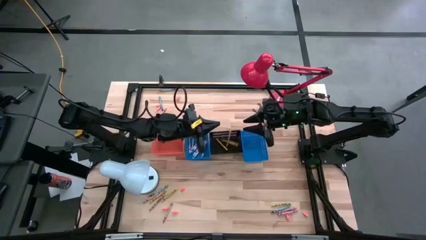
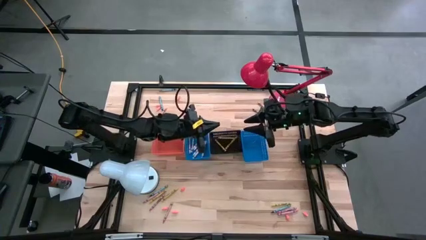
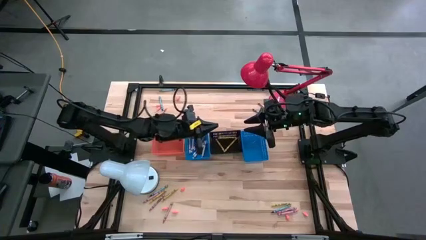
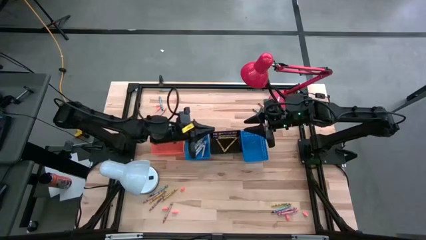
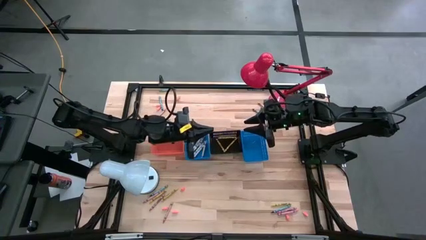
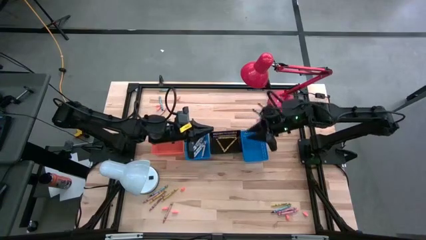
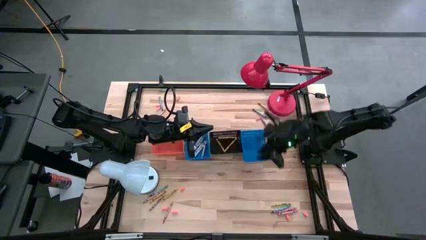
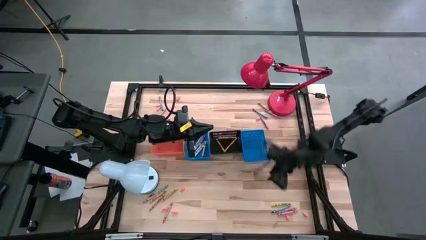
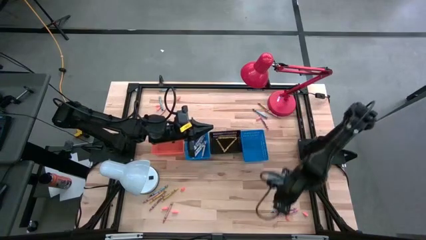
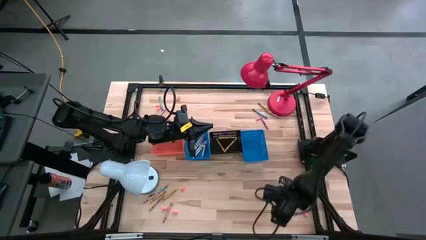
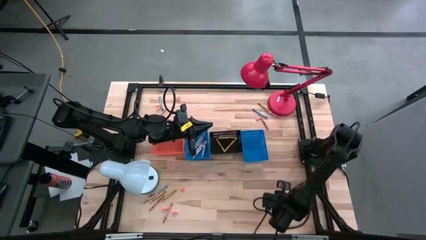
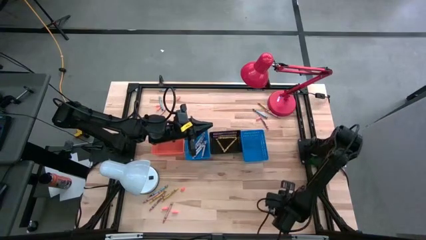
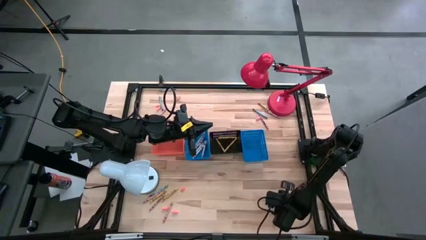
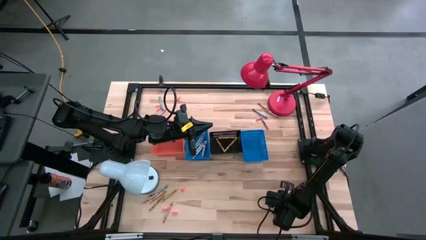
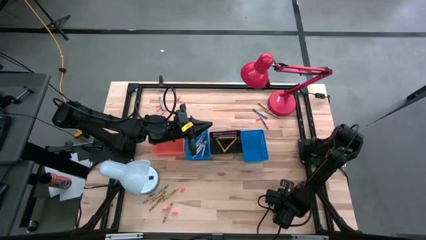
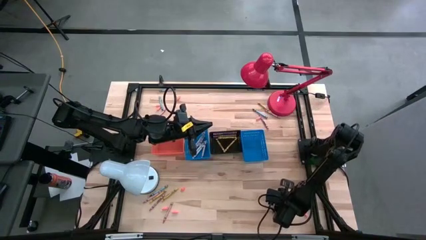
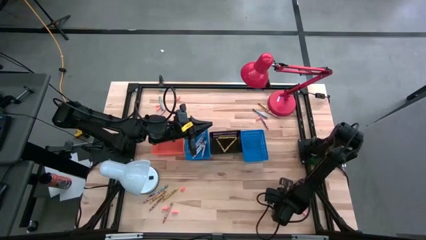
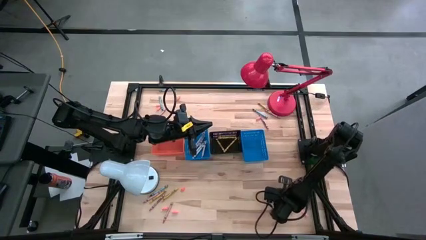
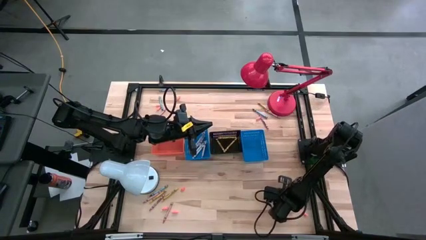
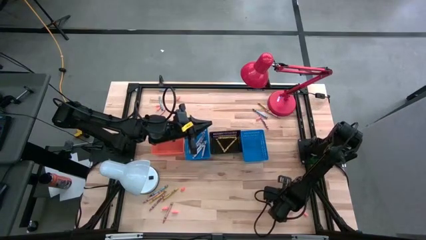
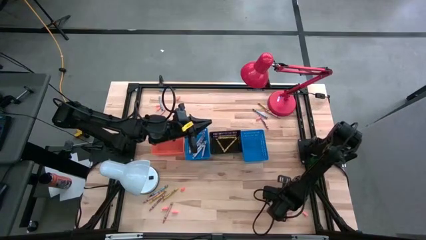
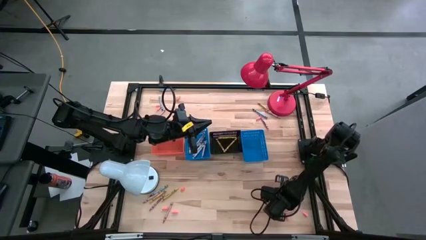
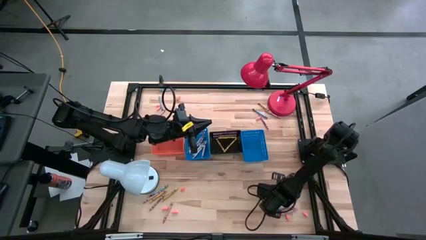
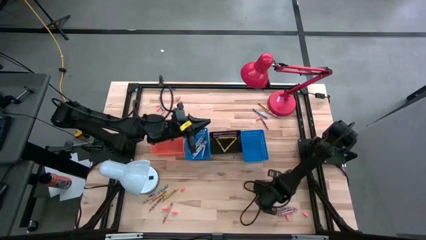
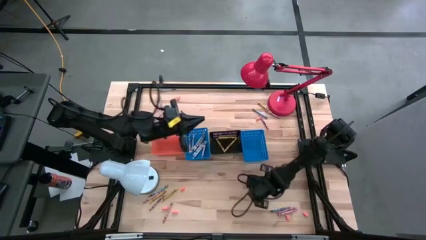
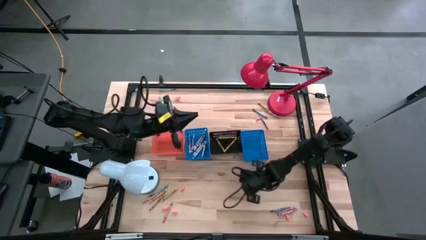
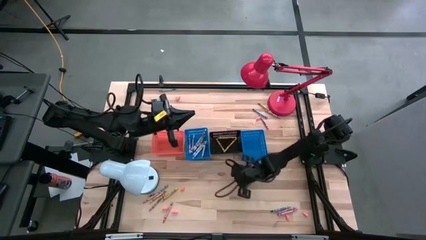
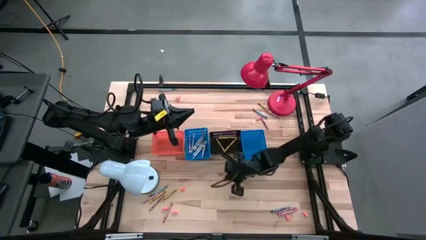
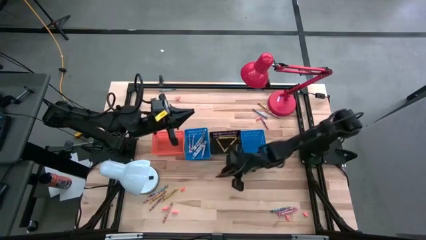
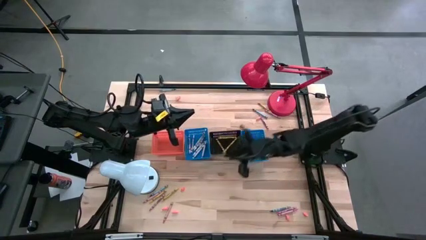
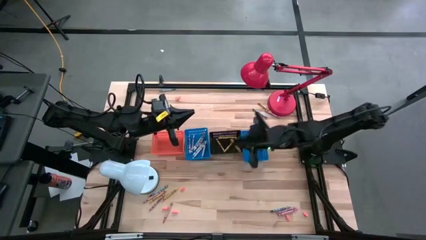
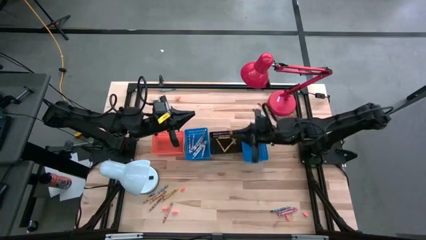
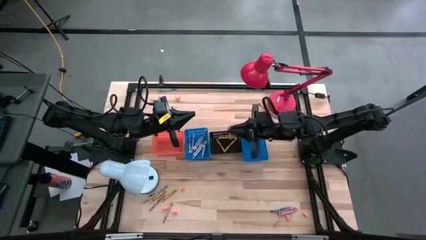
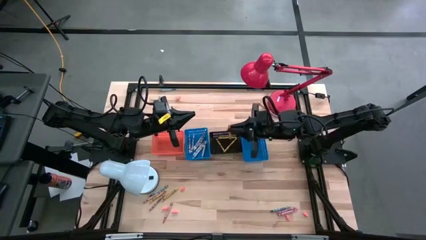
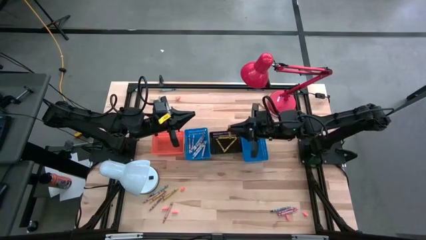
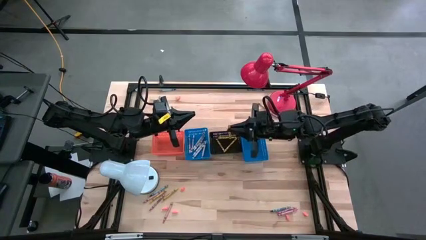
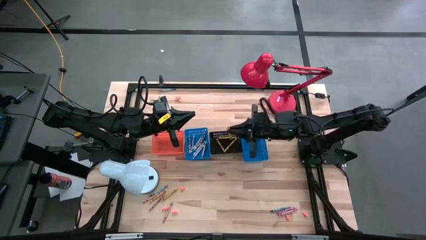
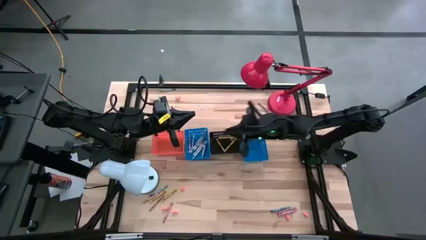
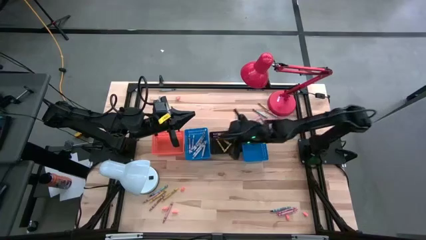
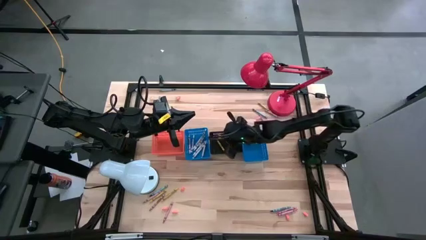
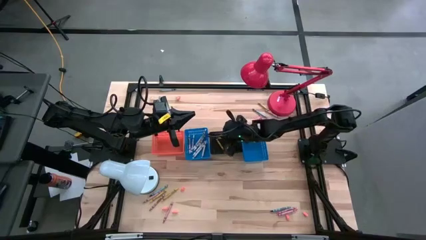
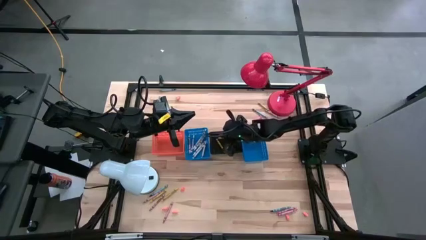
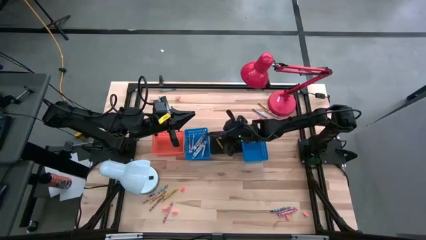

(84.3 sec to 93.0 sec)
Task: Sort crayons
Put the yellow crayon into the black bin

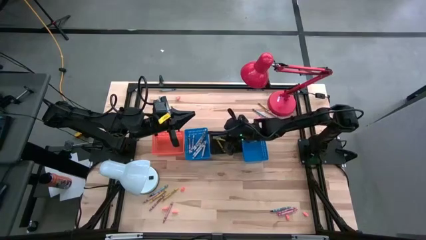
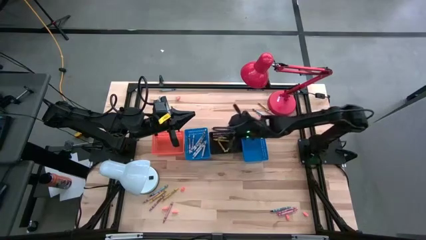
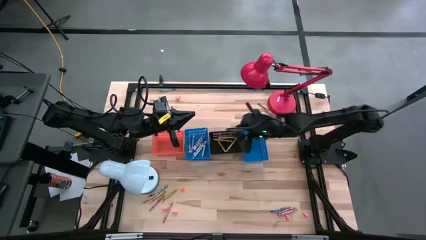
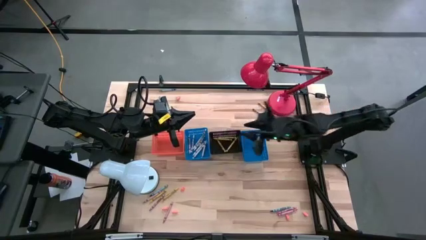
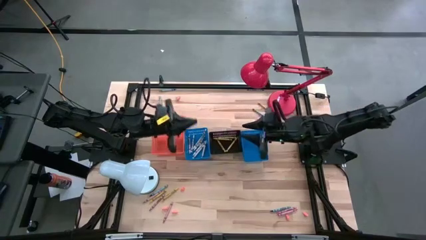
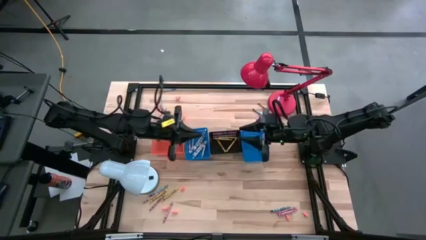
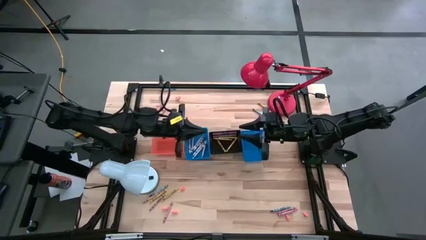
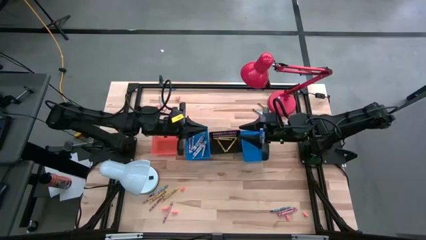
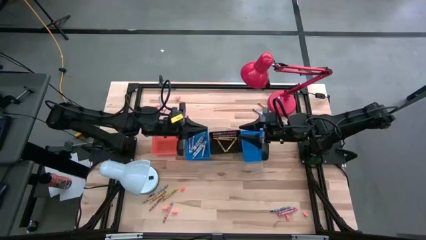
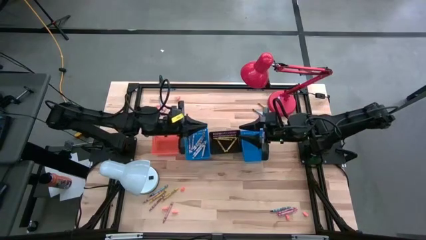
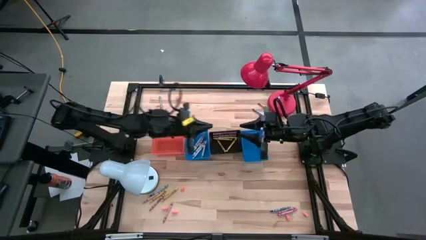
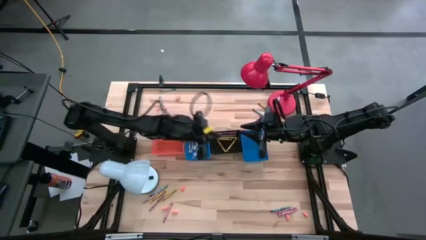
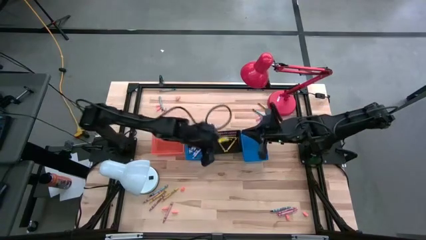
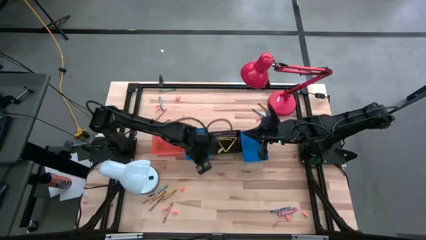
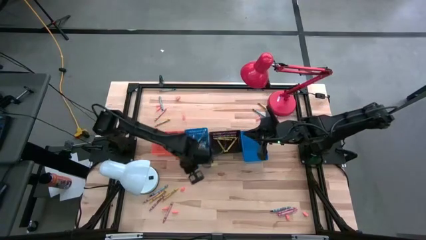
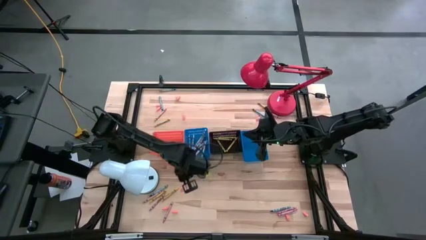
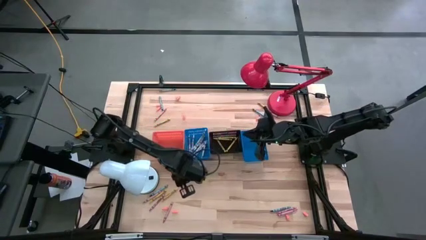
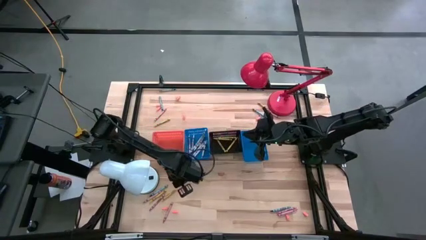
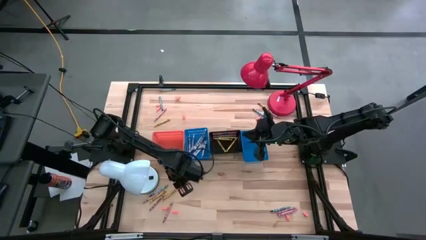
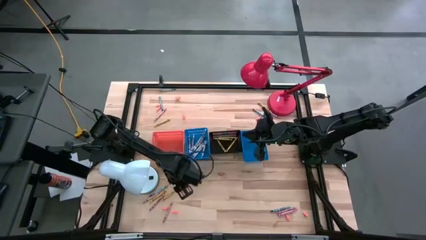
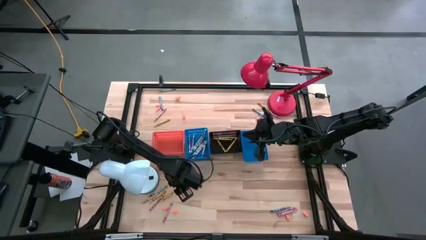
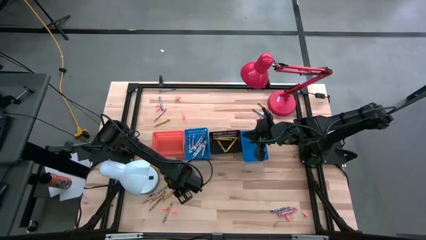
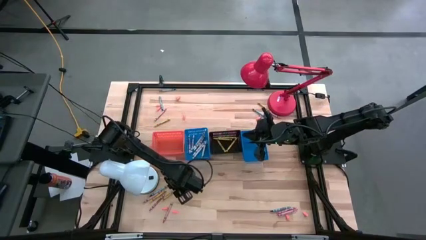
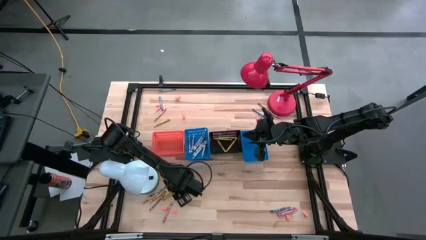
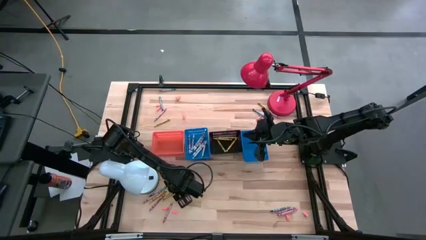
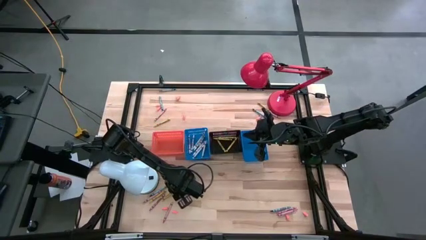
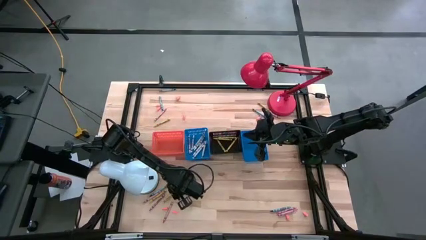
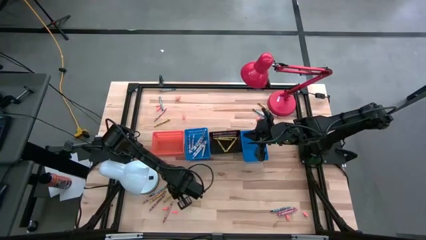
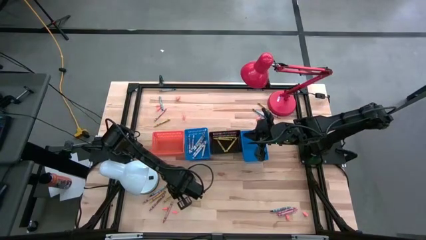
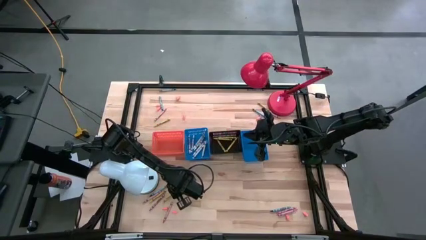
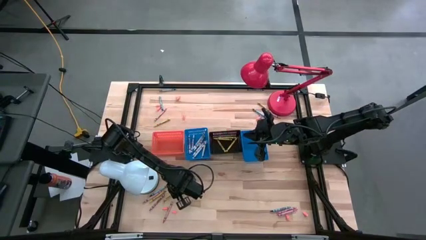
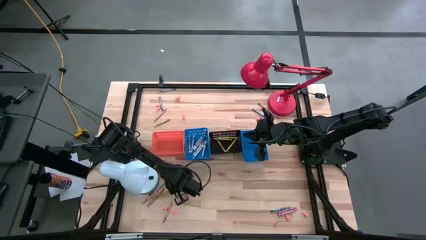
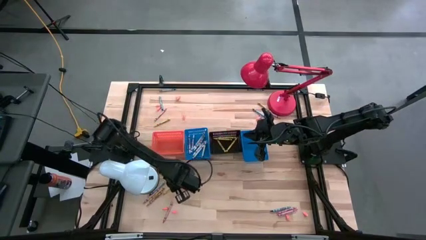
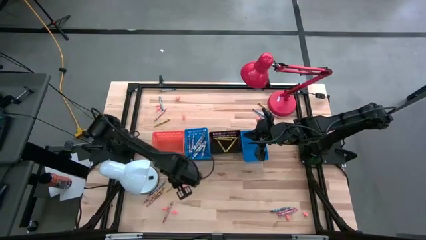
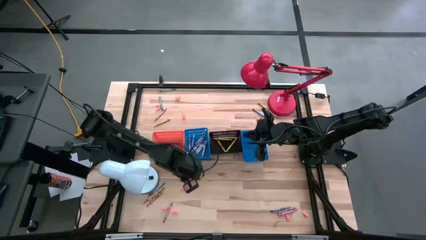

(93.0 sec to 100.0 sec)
Put the yellow crayon into the black bin

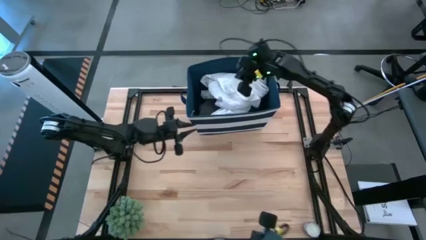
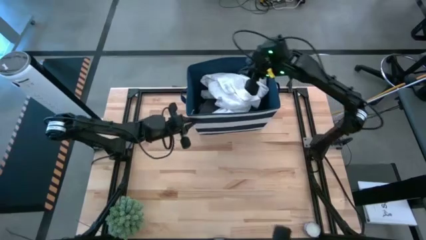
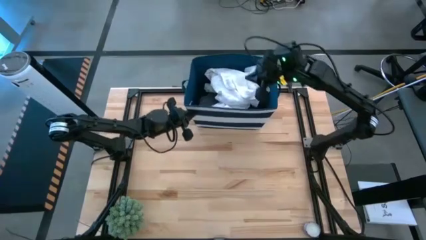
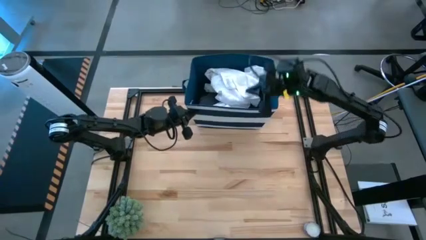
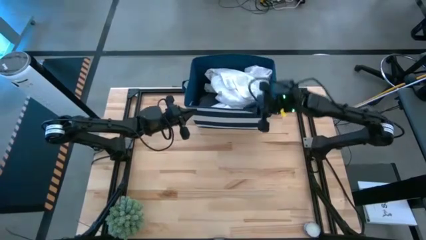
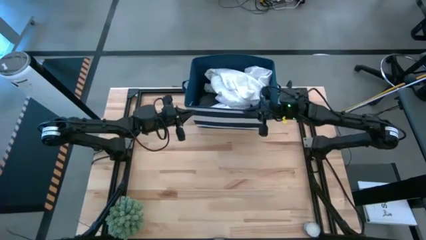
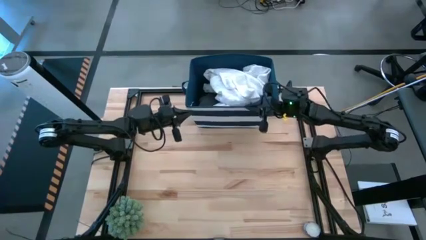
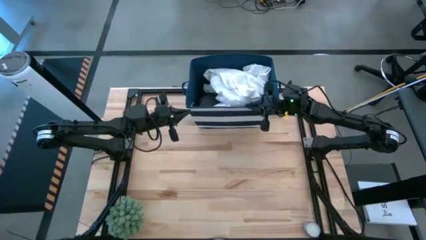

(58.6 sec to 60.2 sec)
Task: Sort clothes
Adjust the laundry bin
